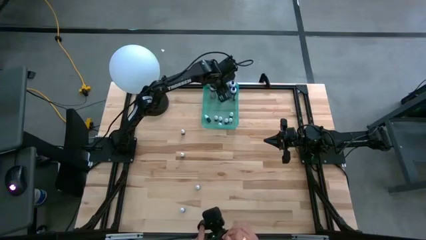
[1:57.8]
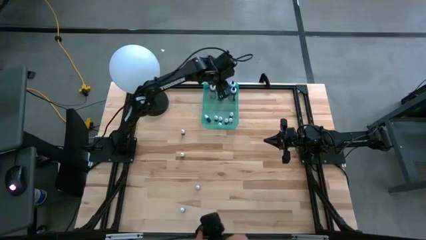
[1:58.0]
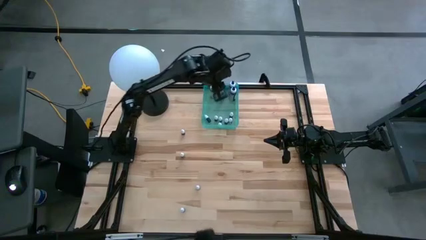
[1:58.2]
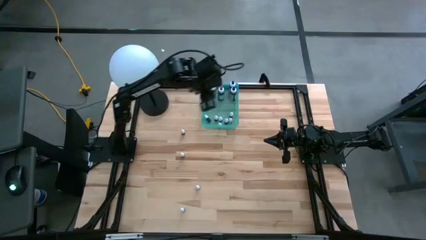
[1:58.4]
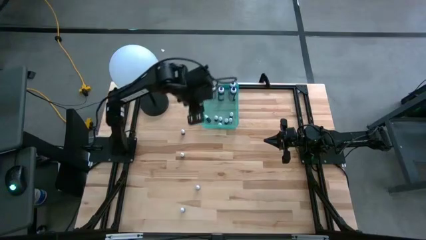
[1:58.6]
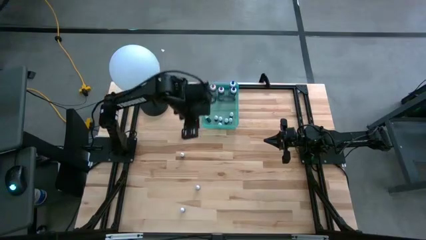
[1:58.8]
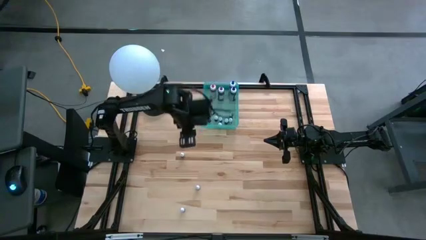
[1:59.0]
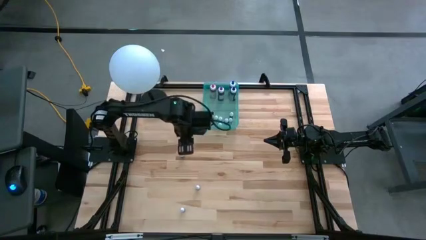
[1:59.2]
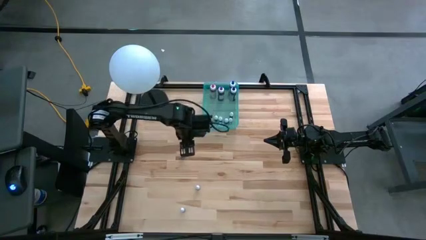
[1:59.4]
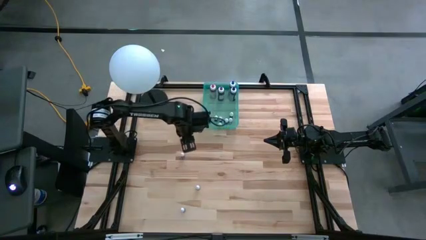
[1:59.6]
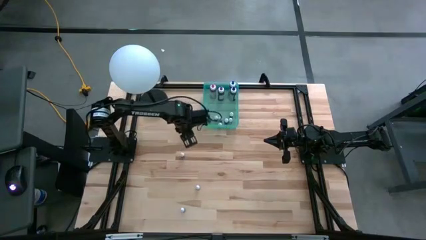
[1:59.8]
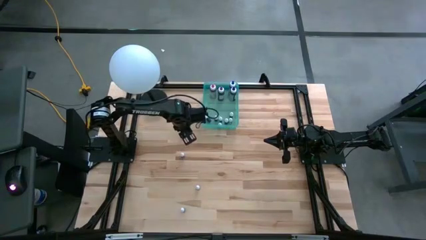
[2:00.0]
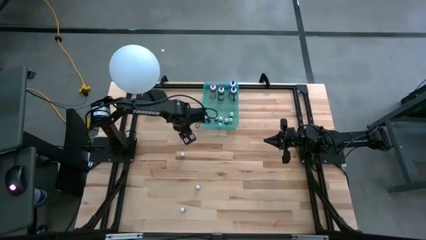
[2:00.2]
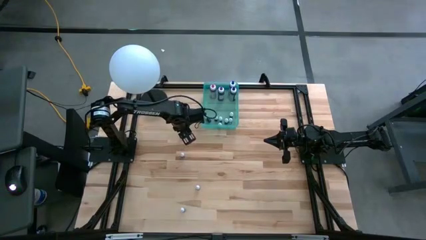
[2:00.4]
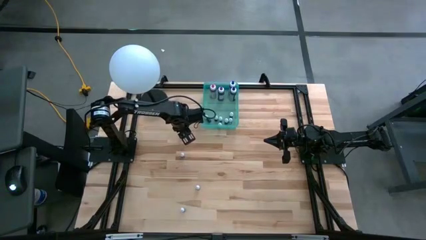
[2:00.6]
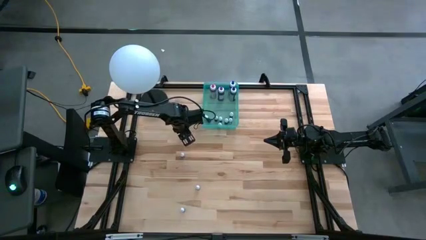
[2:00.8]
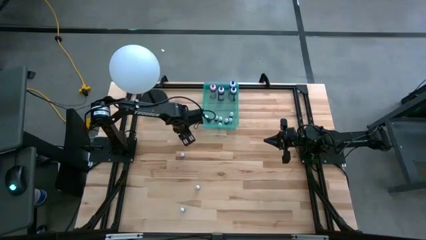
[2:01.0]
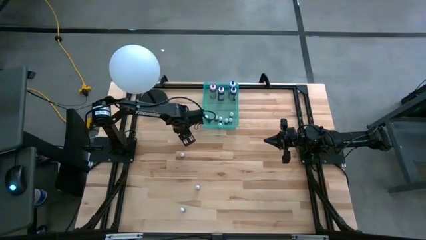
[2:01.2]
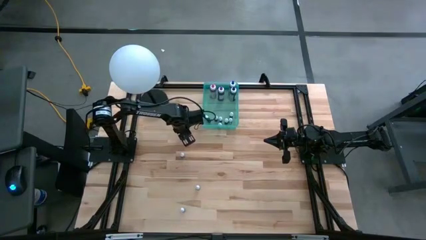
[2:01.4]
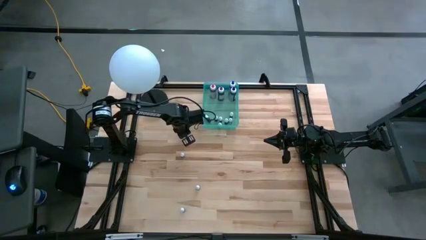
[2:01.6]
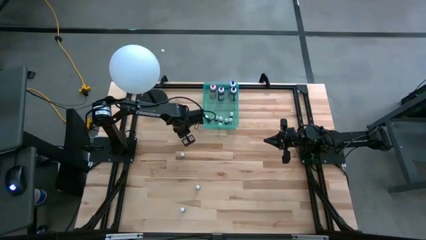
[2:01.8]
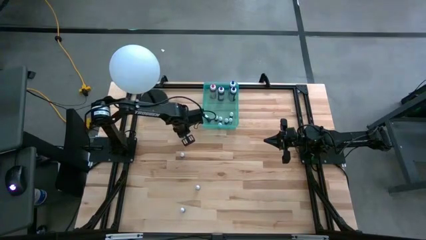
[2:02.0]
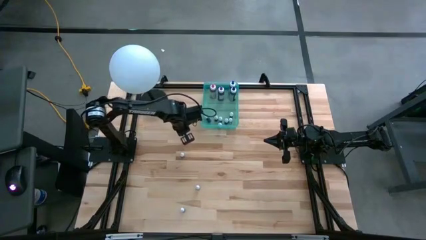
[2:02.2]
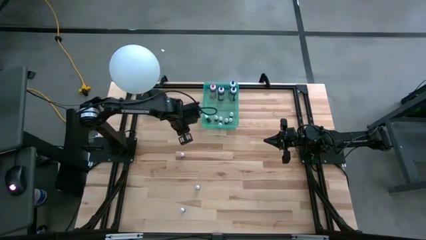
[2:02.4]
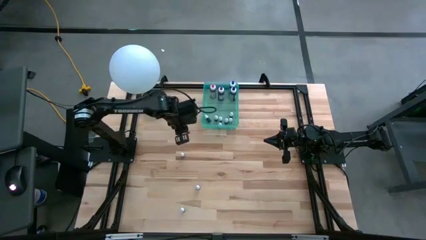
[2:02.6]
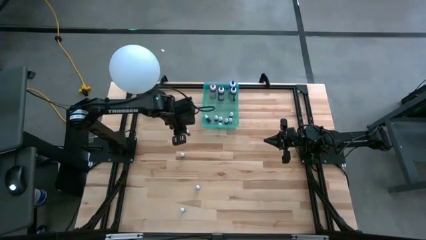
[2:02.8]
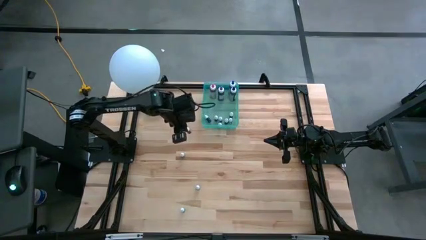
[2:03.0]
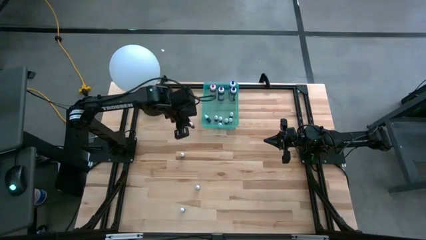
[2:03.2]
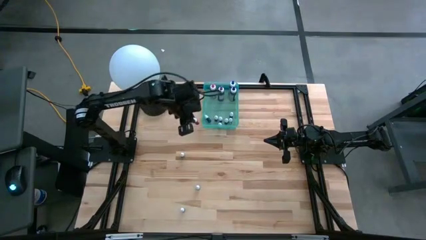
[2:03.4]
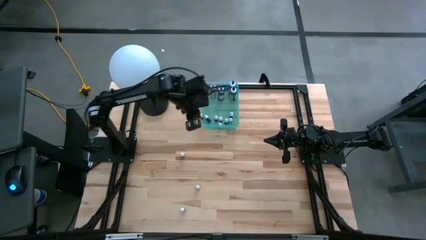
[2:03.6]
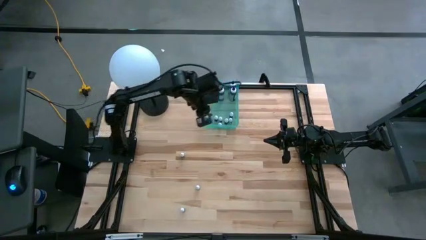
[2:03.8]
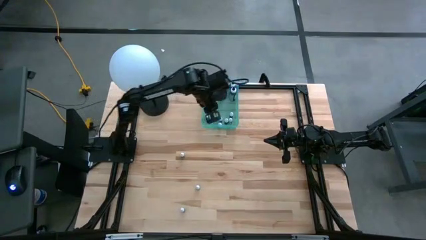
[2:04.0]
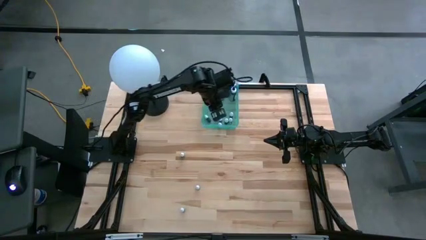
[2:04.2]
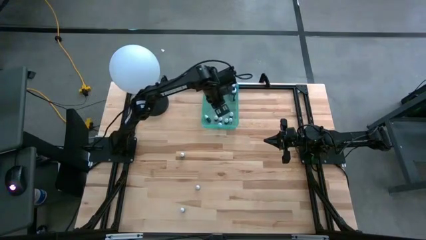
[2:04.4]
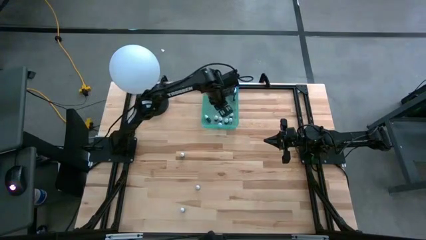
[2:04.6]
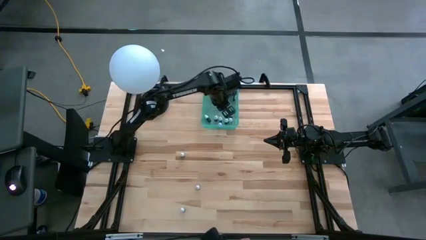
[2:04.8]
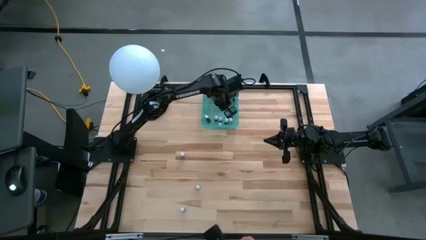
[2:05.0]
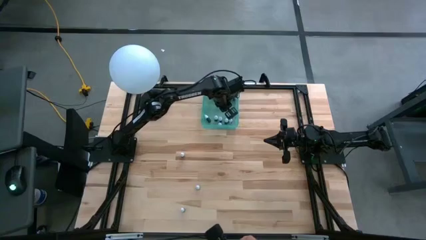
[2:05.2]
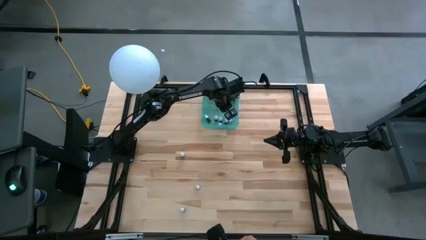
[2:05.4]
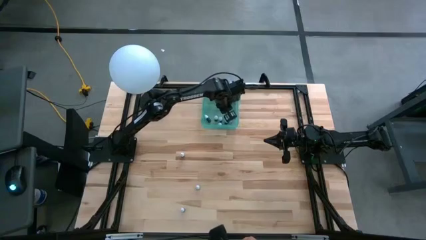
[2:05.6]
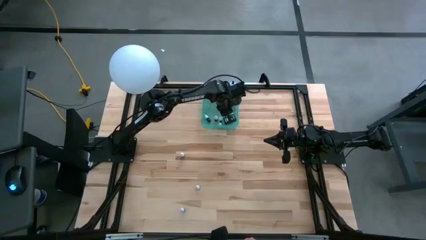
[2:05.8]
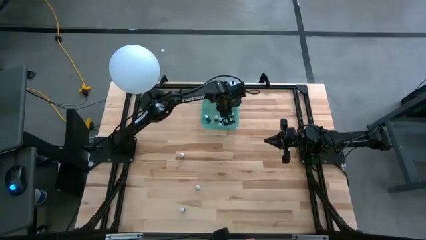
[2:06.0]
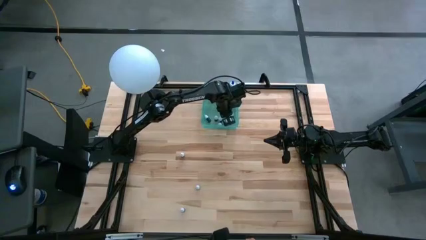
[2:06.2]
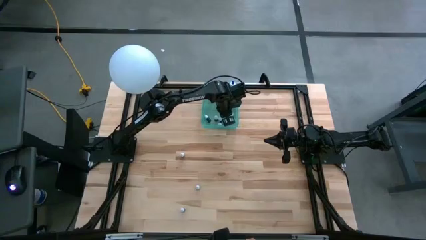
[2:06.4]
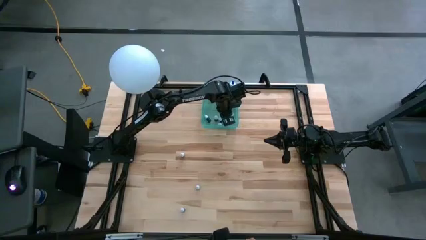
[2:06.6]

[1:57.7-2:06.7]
Task: Pick & Place food coloring
Put the orange food coloring bottle into the light blue bin

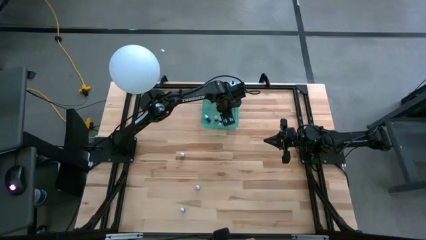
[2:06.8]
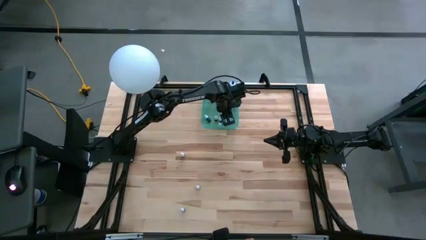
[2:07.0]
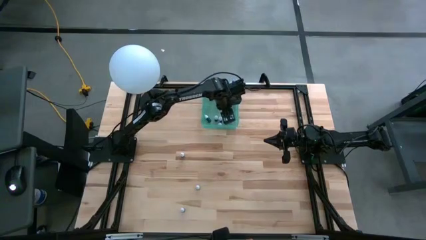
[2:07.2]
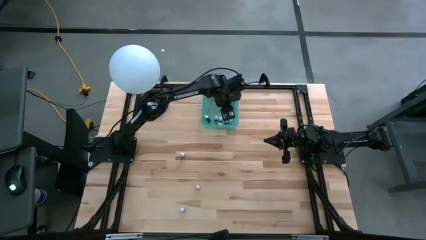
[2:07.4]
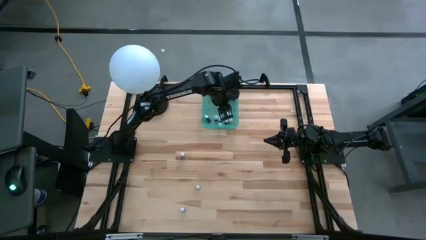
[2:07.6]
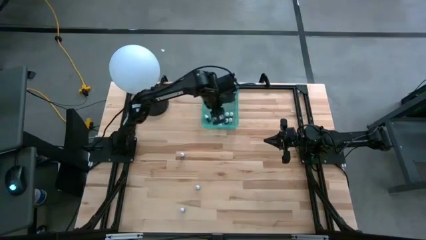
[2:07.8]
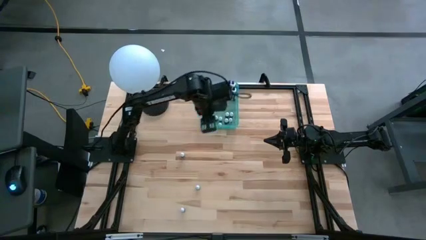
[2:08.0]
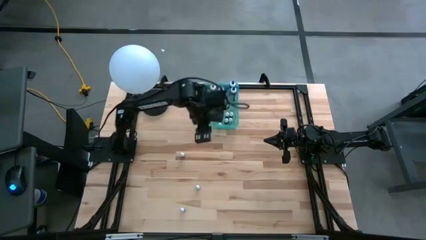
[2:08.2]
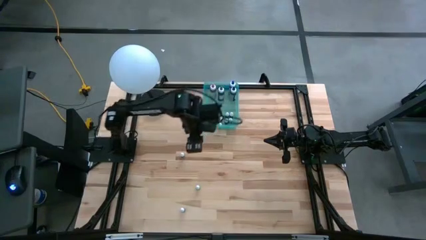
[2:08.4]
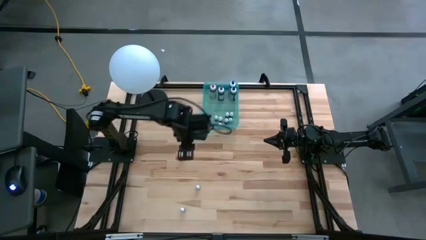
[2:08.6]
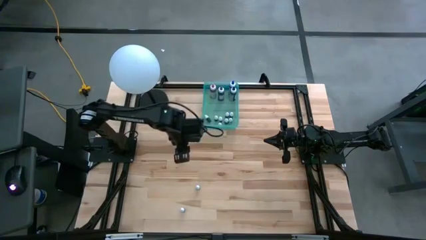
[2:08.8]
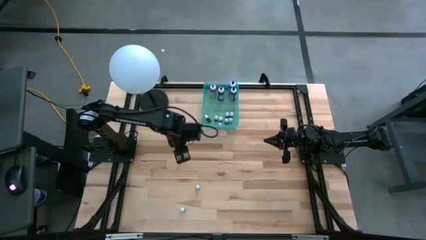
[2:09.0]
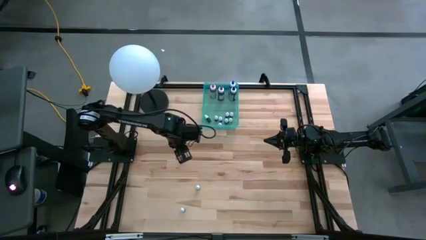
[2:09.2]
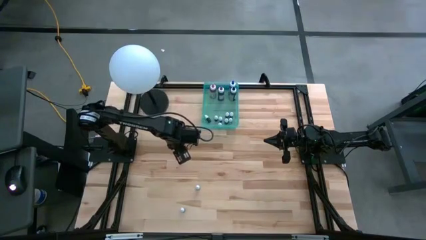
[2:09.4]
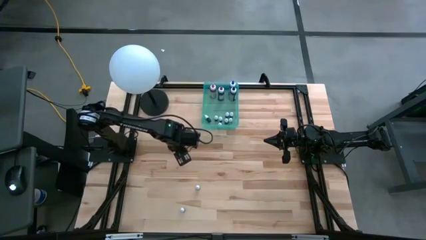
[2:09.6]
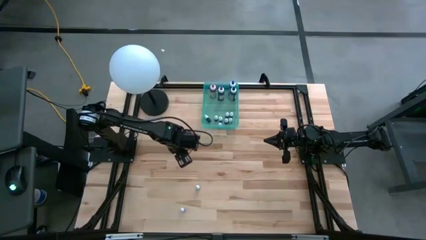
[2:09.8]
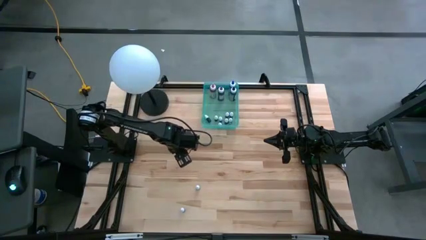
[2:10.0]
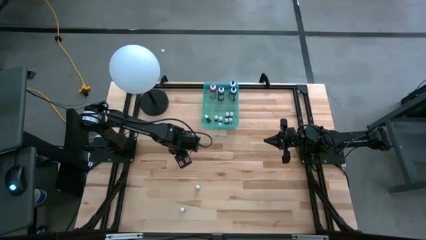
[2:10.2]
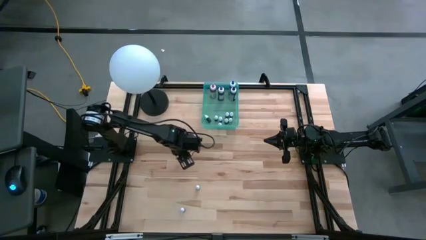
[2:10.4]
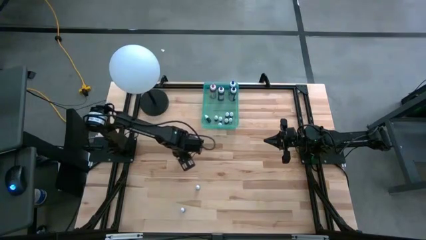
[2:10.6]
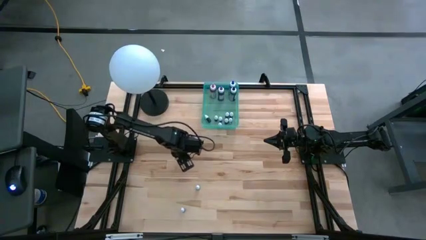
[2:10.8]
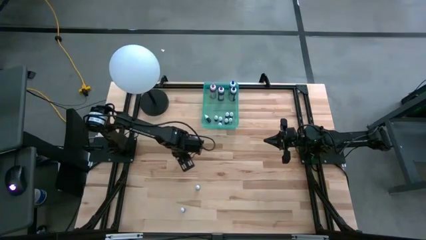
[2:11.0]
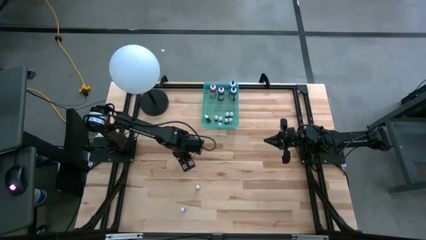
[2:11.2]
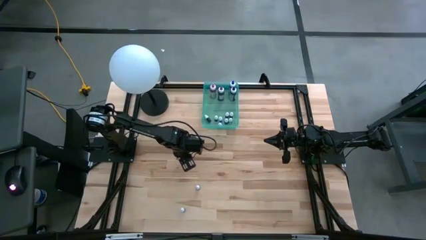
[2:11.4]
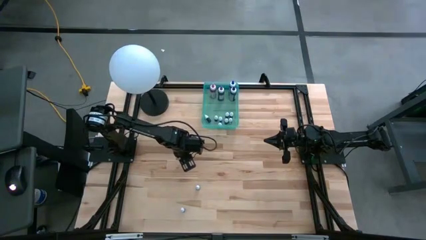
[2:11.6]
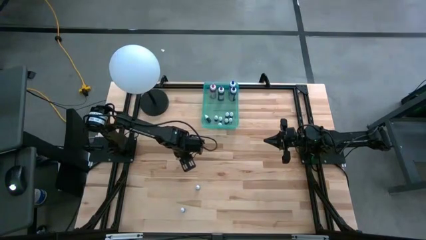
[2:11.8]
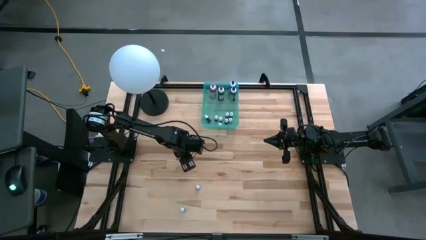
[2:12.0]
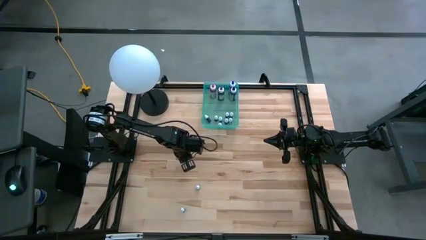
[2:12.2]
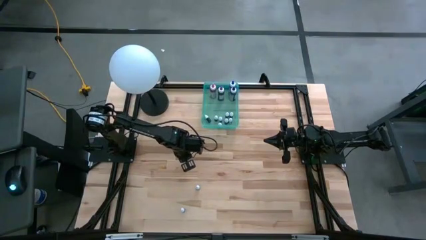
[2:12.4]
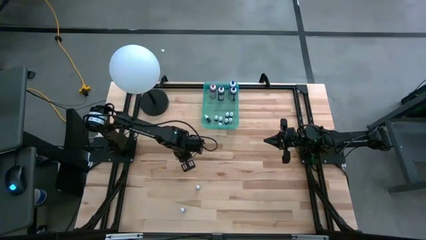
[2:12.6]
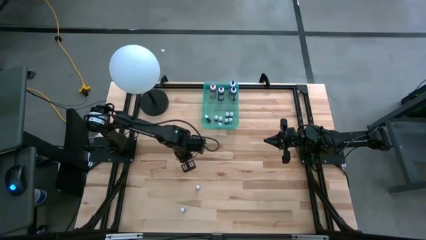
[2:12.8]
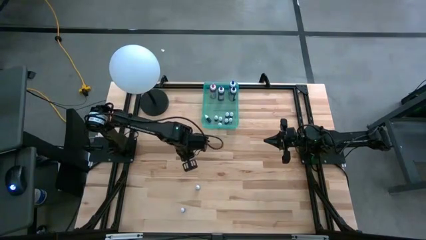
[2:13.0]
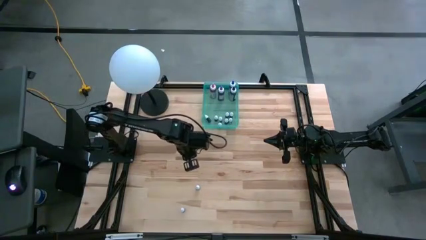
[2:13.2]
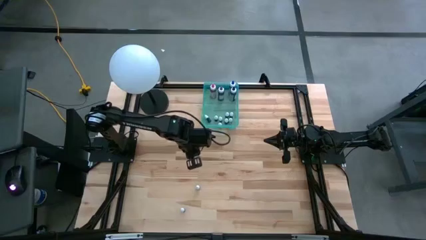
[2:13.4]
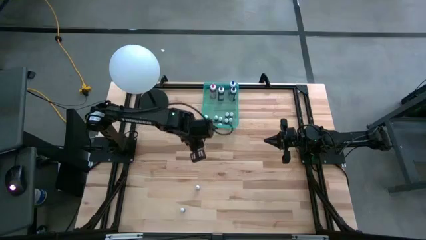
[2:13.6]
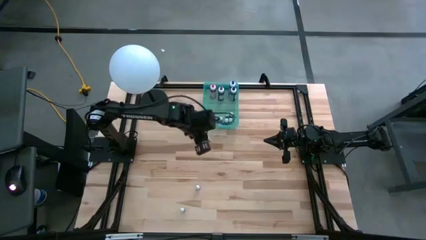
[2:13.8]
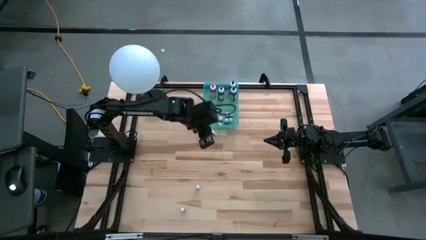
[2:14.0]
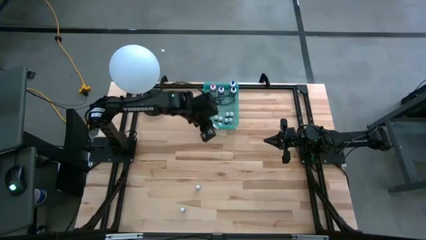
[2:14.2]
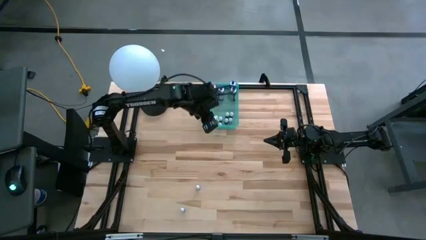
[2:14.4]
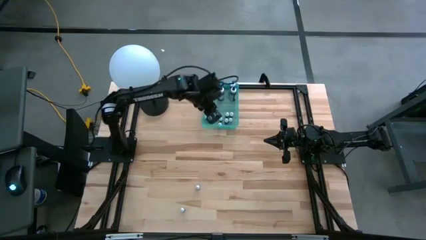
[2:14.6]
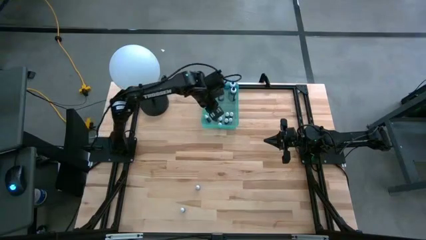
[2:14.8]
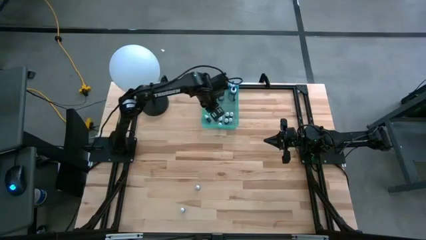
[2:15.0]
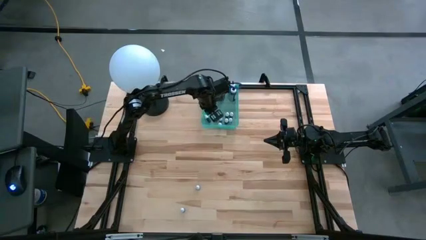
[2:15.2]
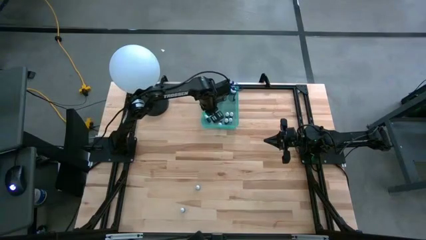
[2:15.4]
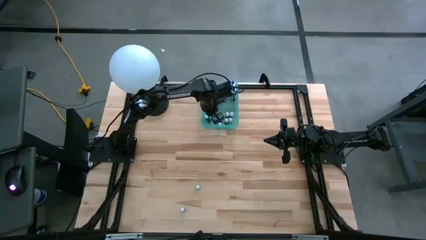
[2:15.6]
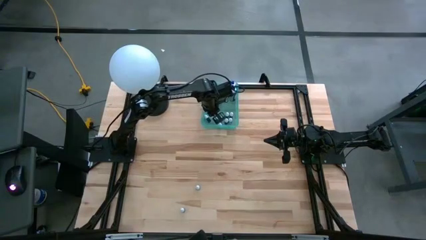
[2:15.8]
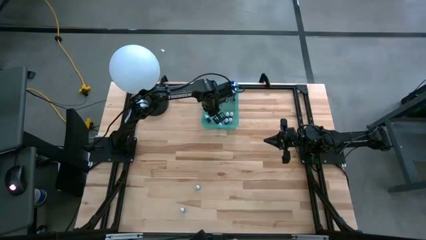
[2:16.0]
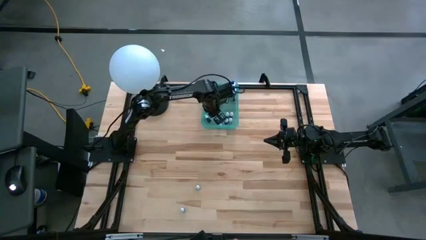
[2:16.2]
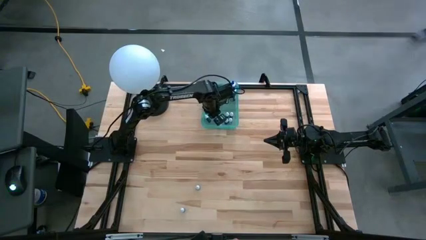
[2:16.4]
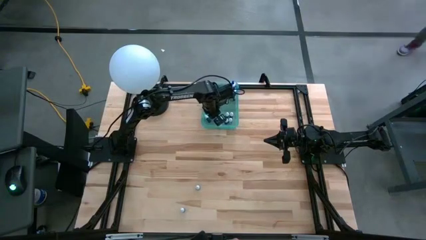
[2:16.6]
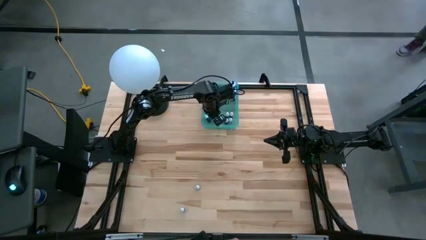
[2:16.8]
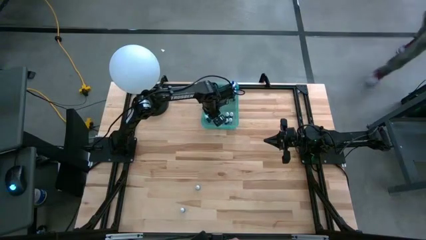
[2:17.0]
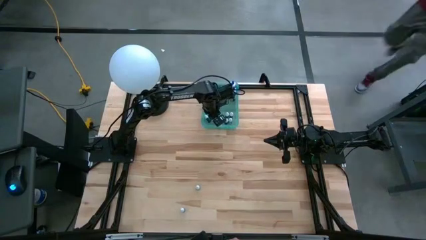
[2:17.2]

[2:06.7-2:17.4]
Put the green food coloring bottle into the light blue bin
